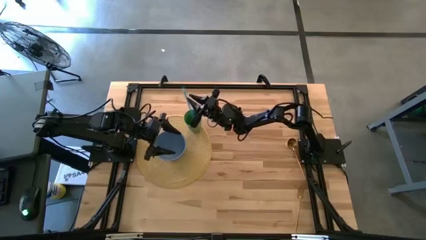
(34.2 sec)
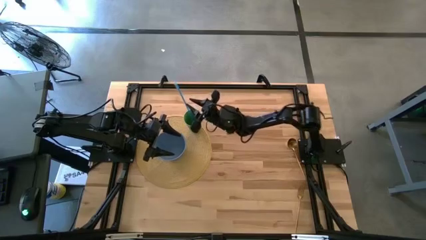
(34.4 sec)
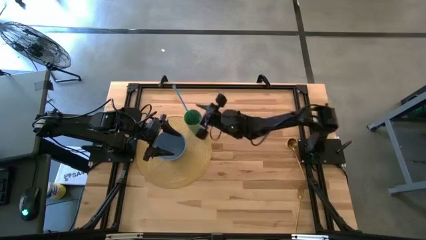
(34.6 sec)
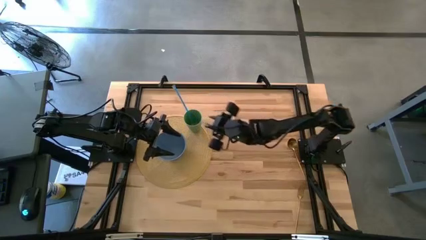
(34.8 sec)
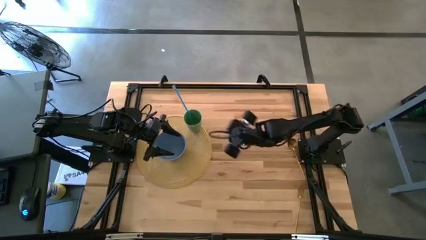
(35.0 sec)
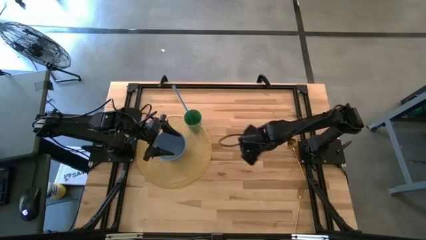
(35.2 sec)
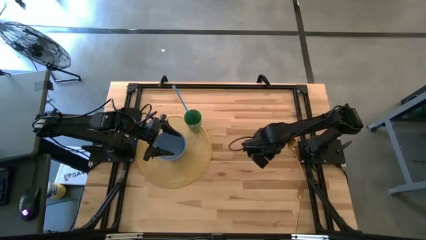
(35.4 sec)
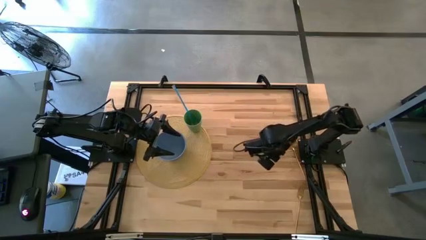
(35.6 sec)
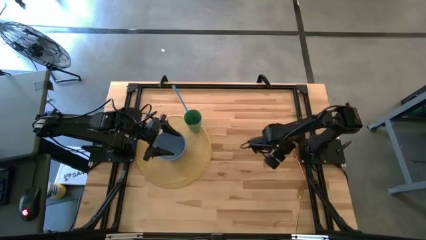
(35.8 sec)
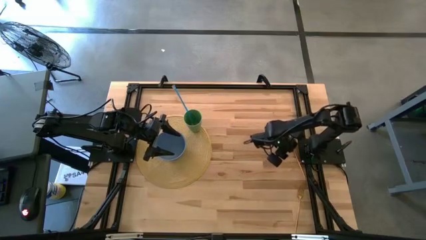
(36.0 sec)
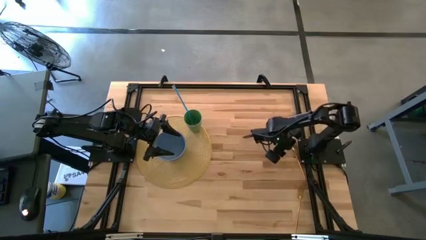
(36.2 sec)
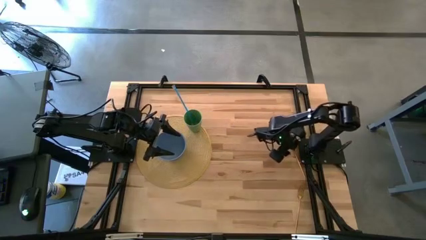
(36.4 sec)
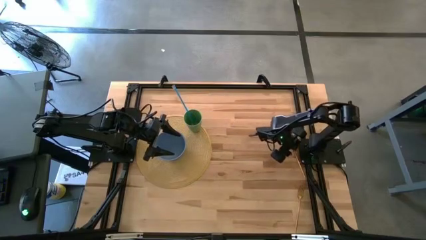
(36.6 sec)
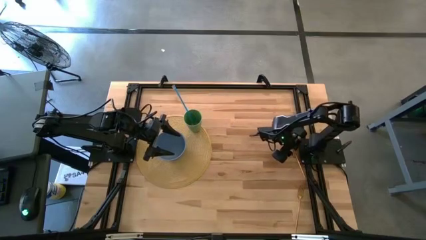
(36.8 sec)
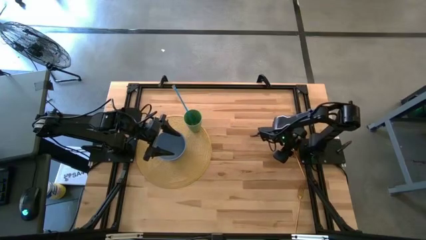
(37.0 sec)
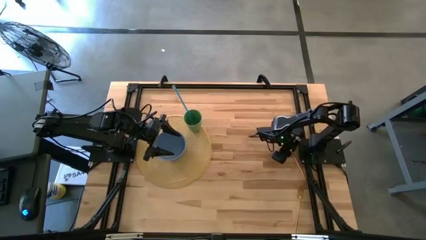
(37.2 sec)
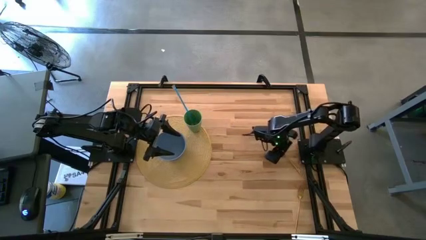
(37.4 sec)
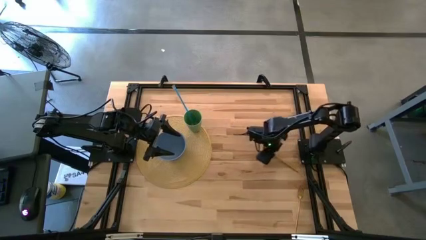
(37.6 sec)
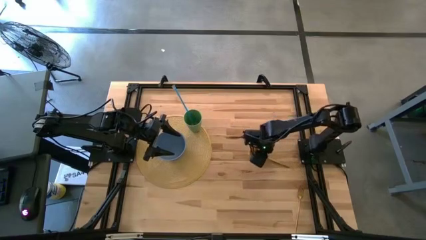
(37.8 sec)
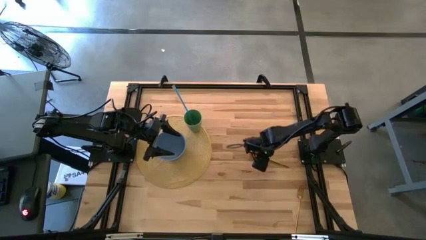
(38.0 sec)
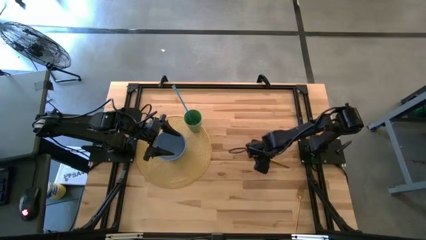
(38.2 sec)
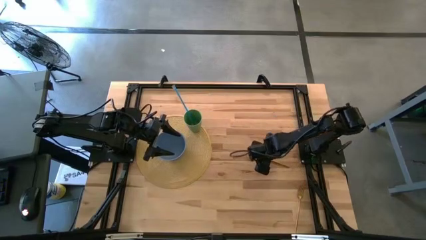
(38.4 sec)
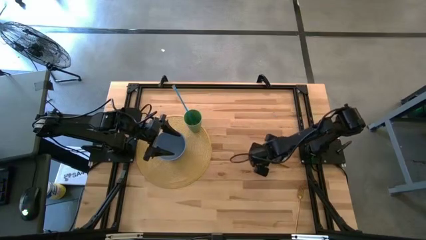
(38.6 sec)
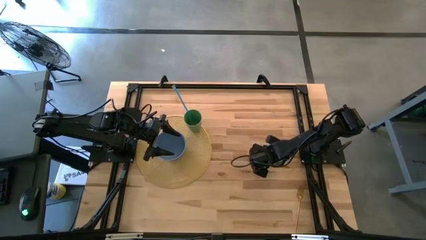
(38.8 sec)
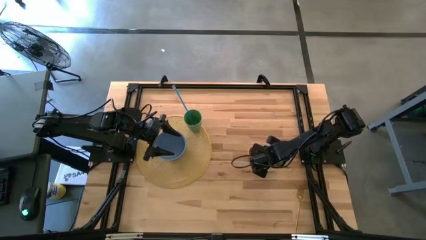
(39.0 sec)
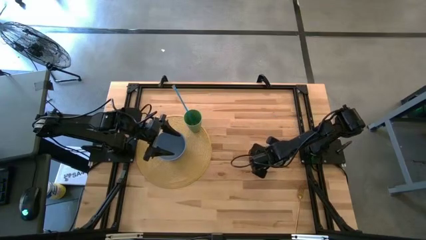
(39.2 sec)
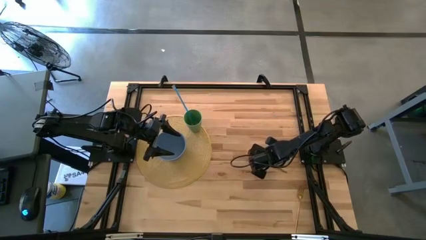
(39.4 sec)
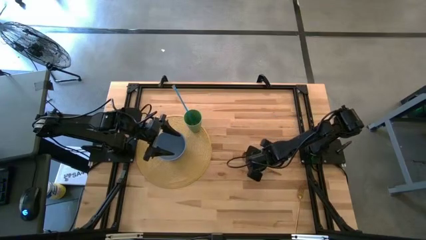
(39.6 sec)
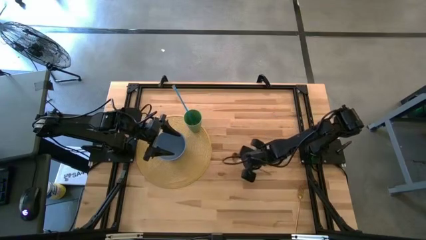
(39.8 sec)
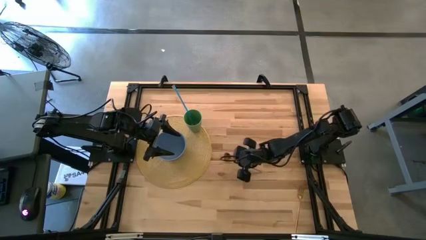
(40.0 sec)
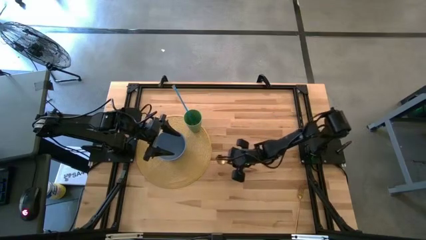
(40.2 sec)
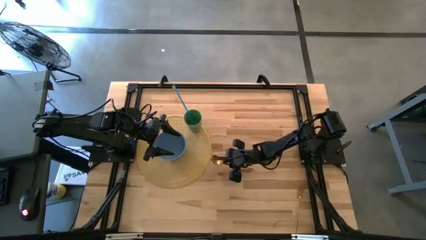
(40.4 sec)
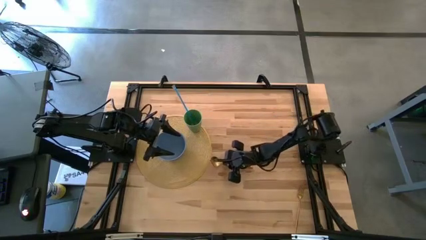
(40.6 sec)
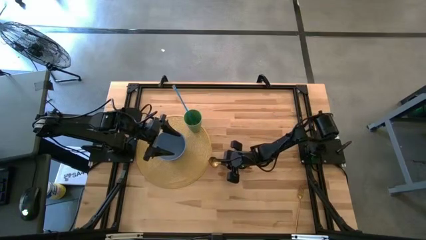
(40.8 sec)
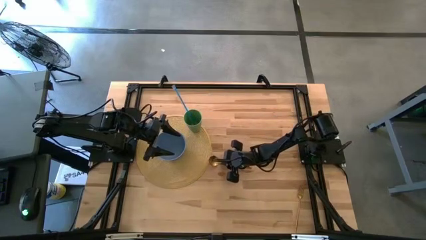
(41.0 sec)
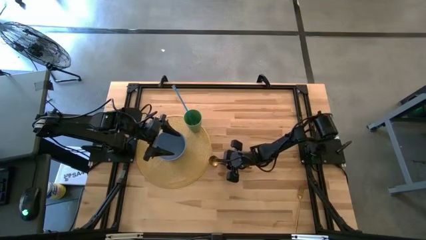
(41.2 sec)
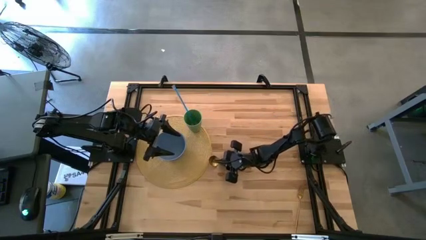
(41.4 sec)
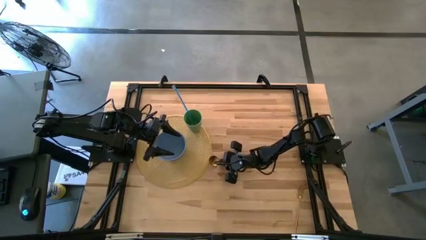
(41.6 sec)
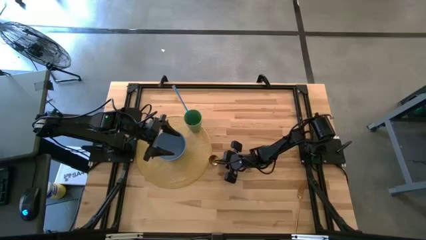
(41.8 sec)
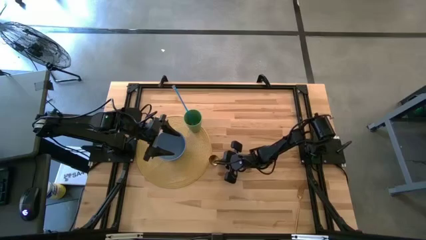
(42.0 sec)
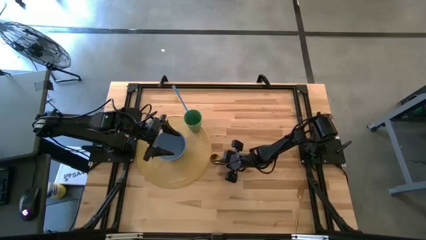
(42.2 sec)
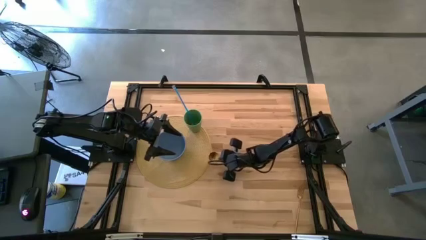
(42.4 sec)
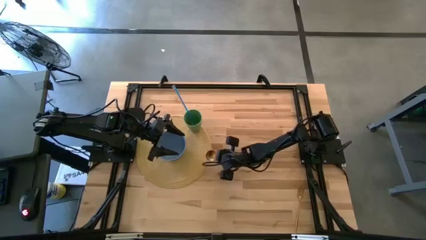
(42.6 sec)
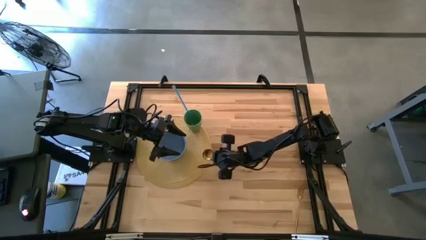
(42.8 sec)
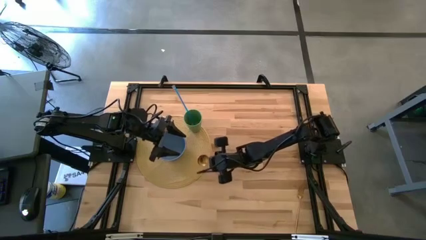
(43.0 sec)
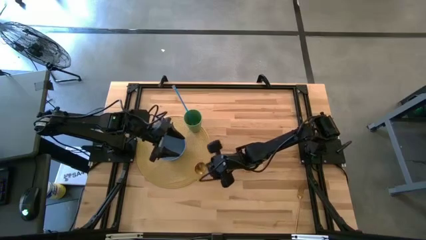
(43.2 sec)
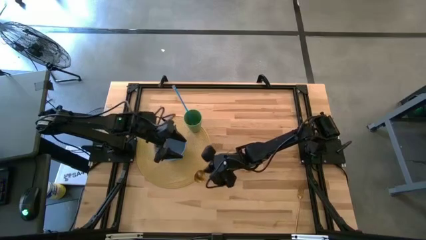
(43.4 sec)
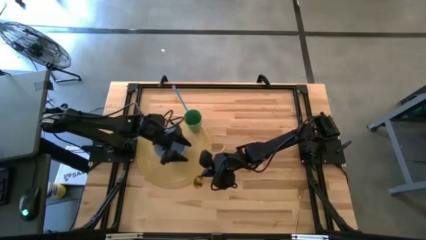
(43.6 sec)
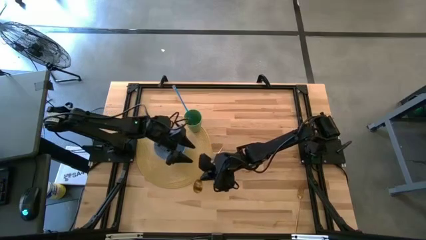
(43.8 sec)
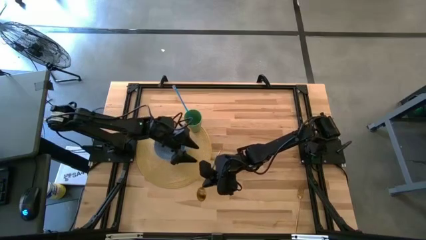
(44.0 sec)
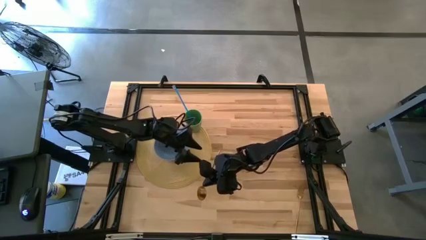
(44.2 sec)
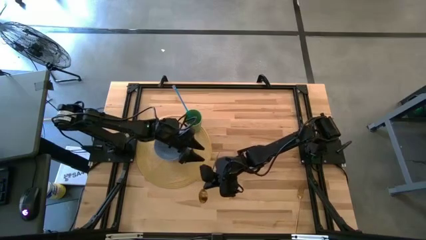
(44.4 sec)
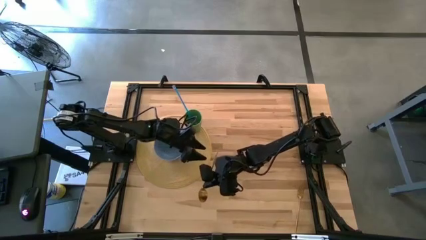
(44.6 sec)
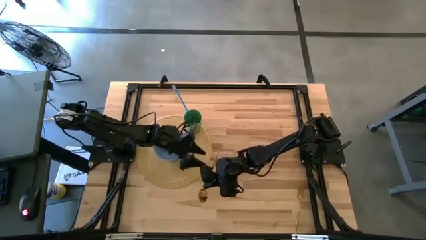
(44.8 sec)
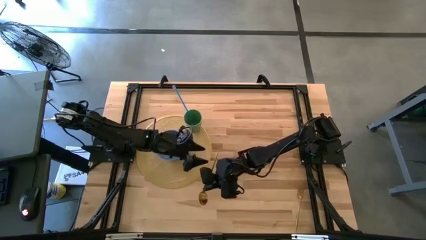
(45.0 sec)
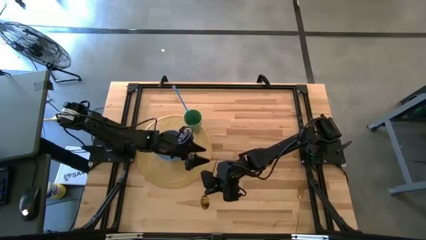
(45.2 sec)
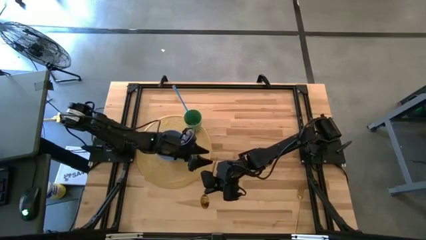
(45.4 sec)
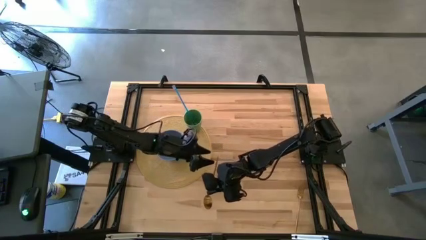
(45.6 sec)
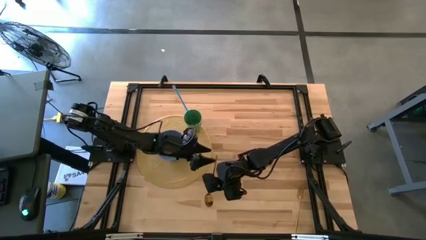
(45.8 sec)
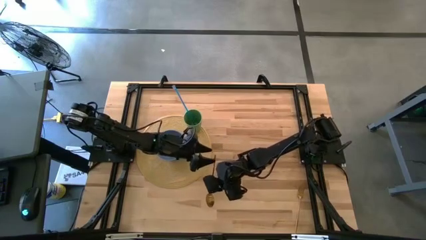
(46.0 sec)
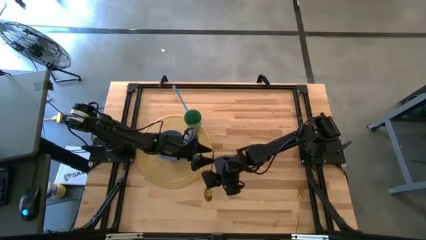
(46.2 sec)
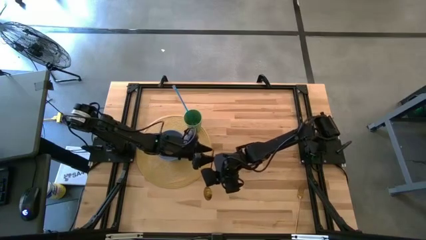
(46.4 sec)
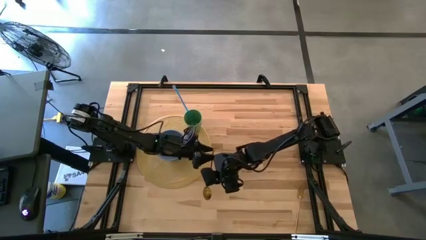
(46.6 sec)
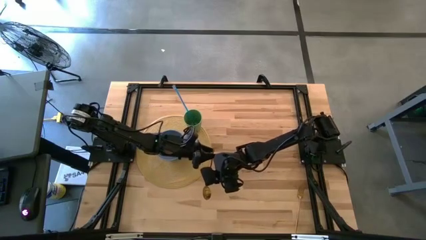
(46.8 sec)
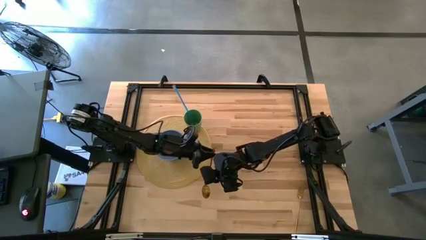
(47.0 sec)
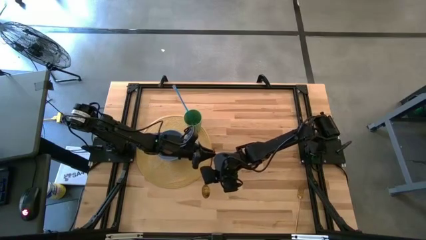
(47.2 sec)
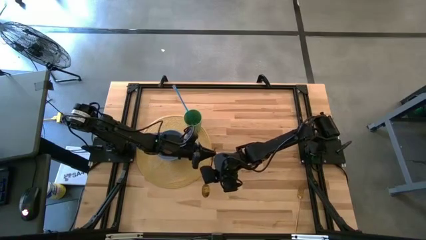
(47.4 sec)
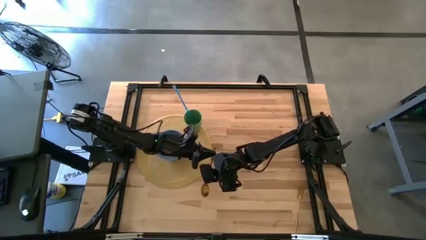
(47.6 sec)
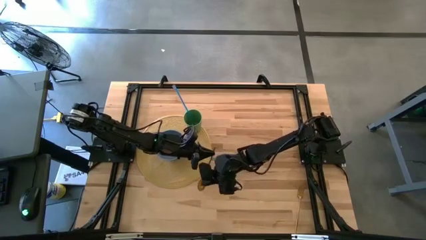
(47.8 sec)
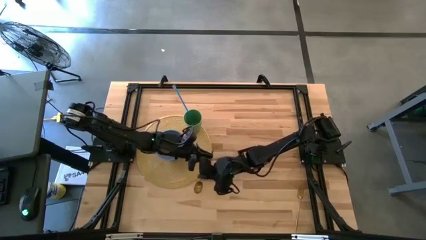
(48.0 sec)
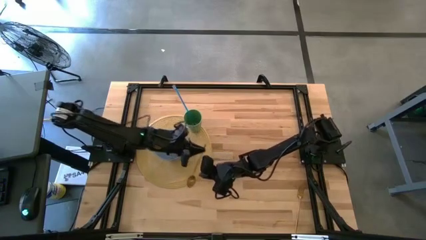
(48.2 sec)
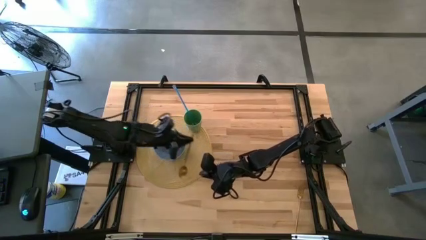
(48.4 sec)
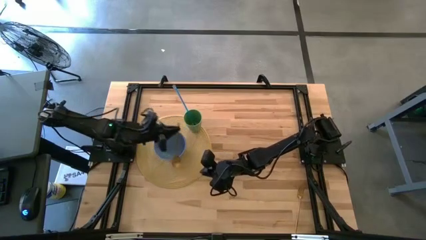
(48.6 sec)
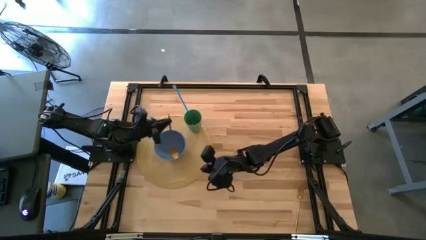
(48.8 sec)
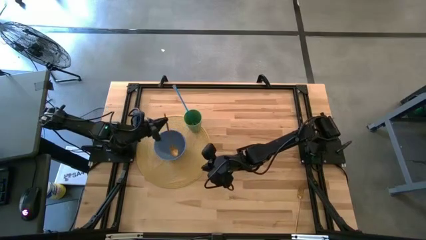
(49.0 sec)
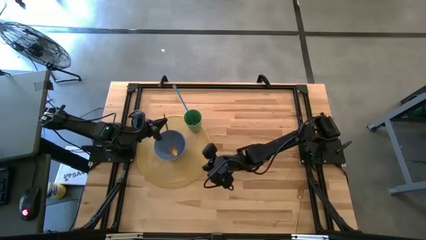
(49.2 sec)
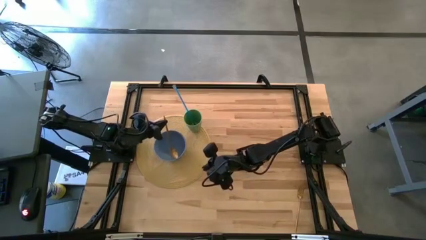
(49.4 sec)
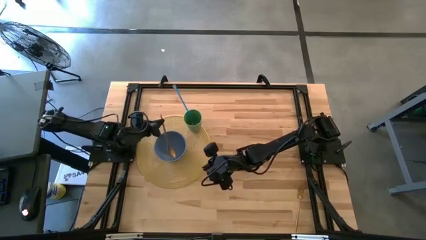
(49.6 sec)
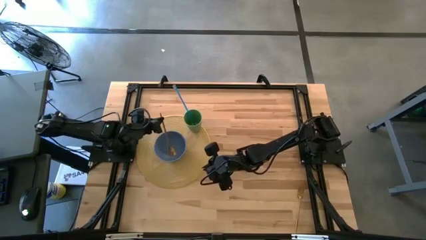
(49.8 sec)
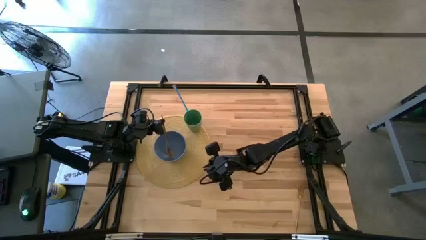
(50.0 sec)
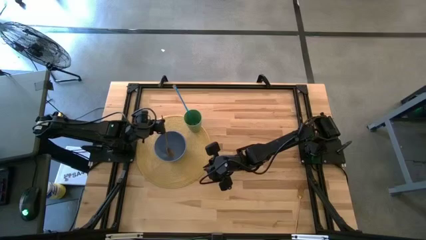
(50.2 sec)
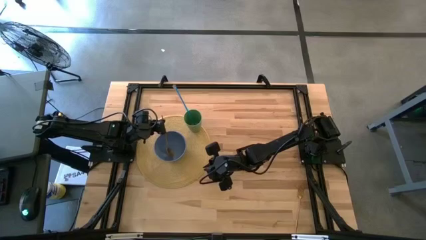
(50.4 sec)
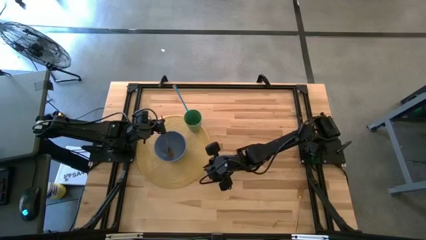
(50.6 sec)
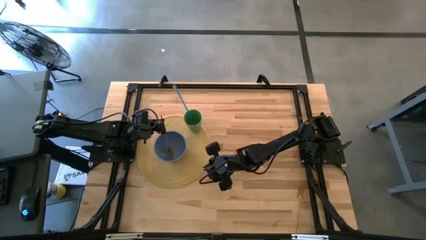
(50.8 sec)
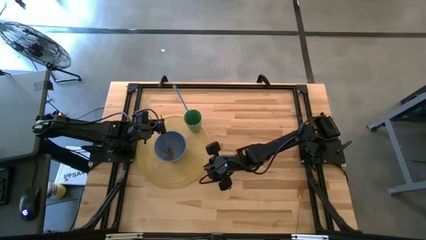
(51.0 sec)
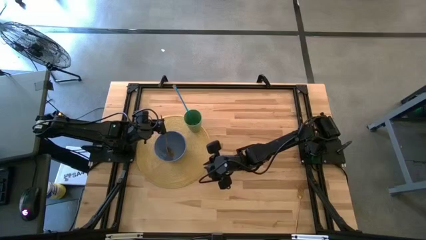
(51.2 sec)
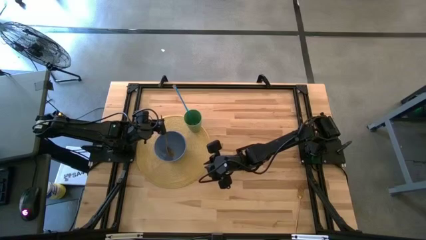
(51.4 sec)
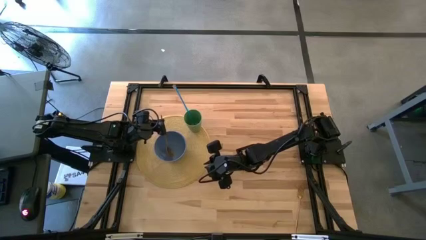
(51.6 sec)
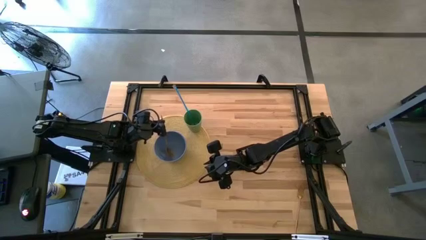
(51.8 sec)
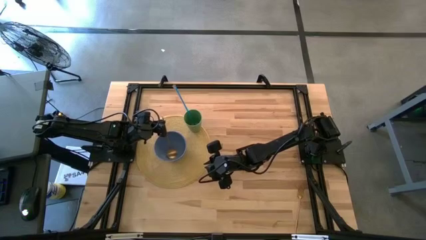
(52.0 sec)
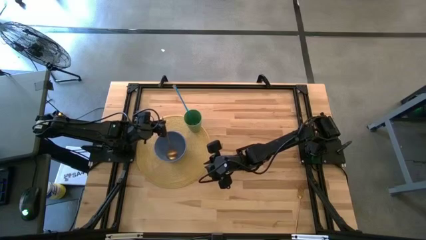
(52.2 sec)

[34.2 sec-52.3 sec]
Task: Pick & Place Utensil
Put the gold spoon into the blue bowl on the brown mat
